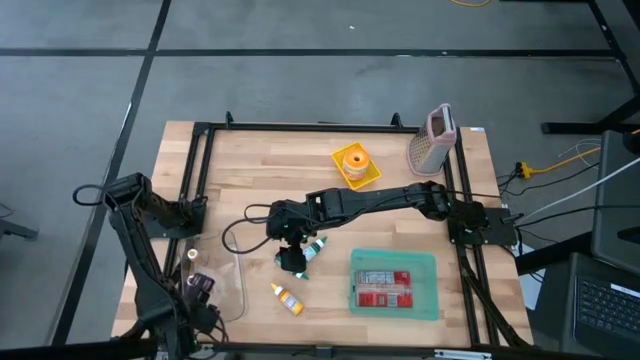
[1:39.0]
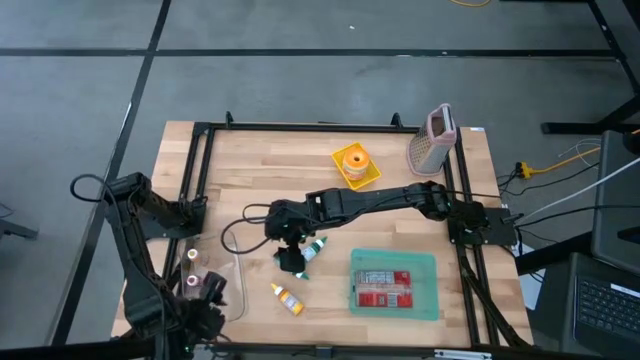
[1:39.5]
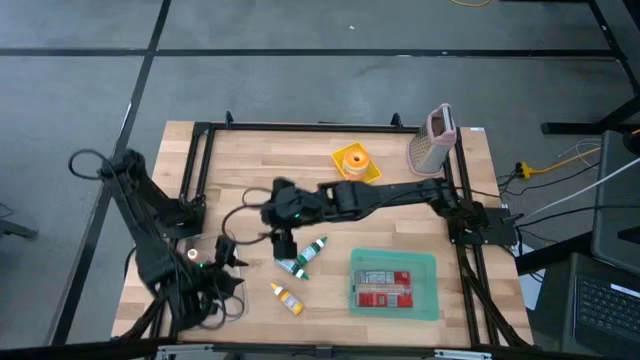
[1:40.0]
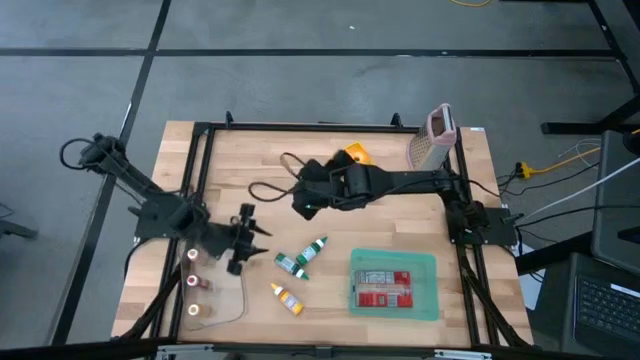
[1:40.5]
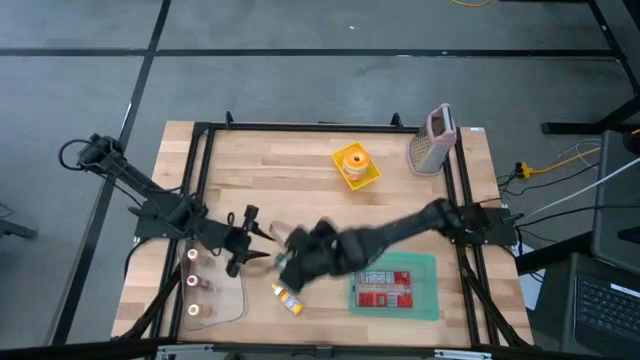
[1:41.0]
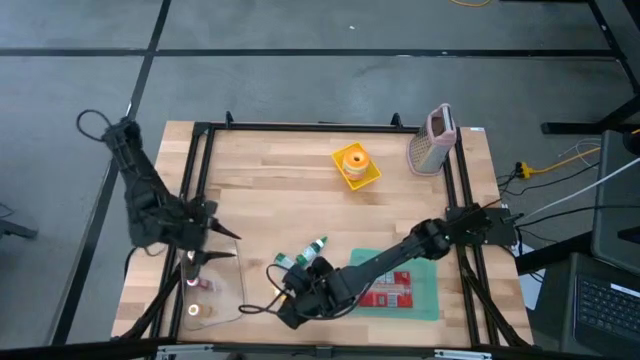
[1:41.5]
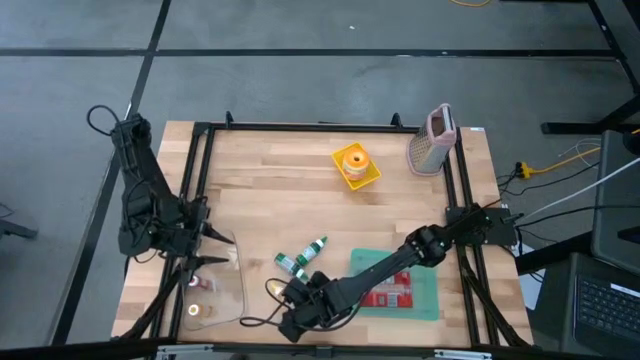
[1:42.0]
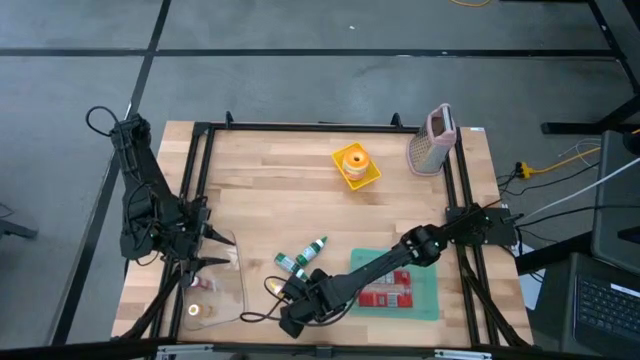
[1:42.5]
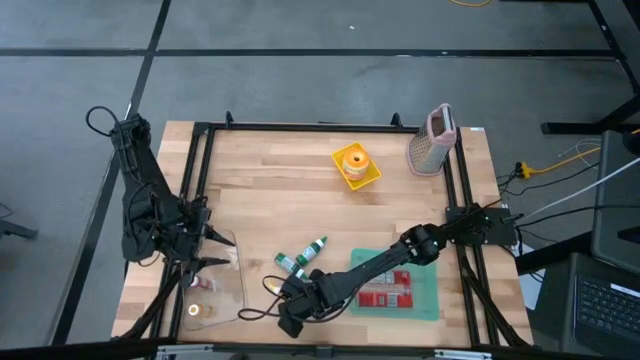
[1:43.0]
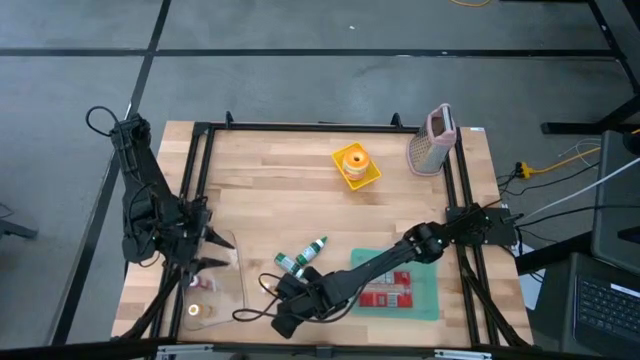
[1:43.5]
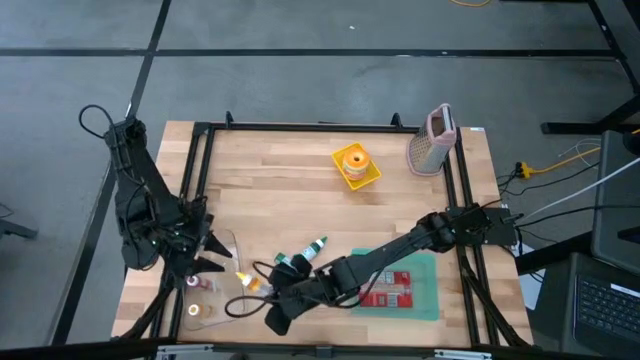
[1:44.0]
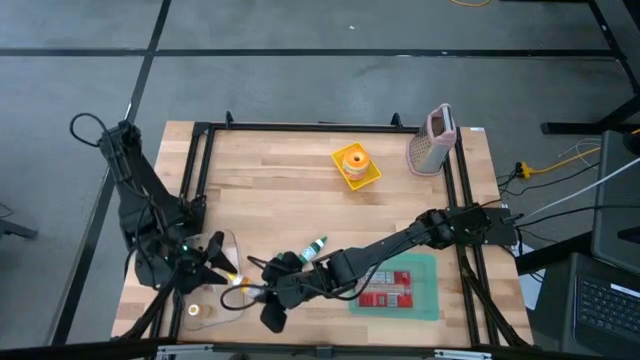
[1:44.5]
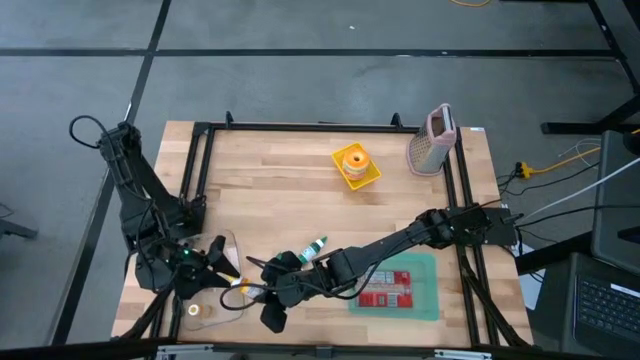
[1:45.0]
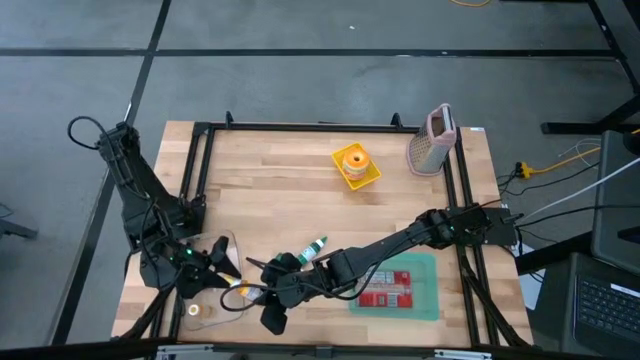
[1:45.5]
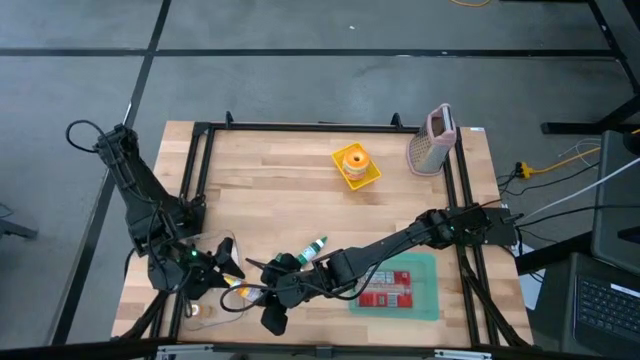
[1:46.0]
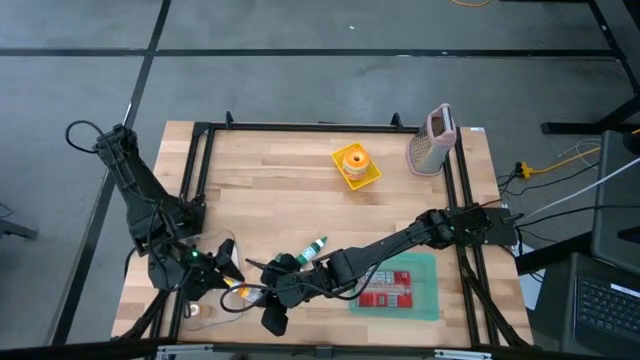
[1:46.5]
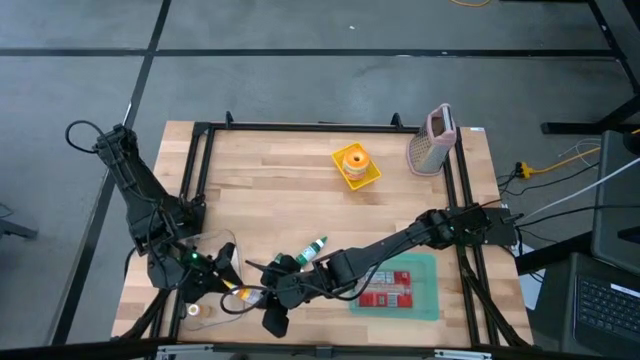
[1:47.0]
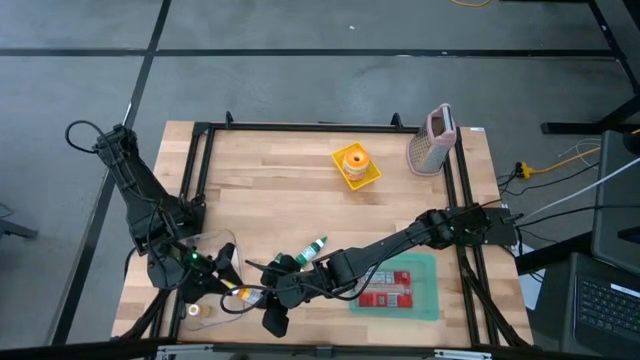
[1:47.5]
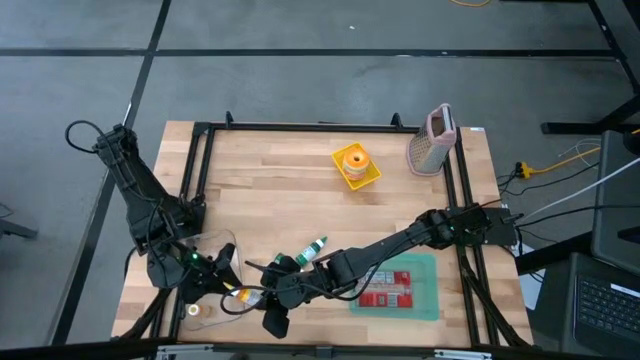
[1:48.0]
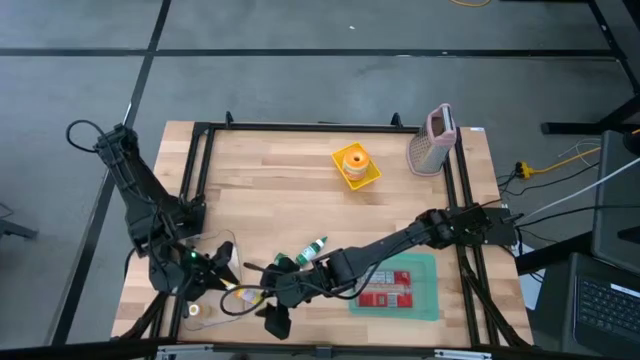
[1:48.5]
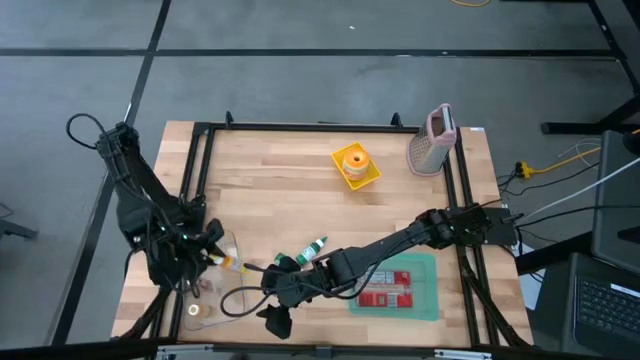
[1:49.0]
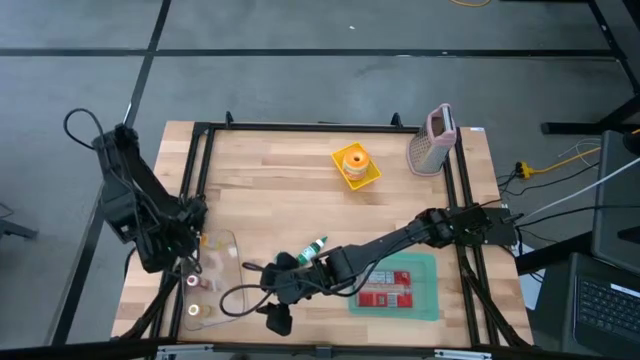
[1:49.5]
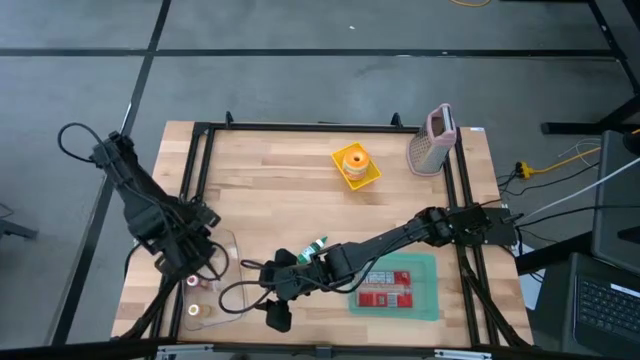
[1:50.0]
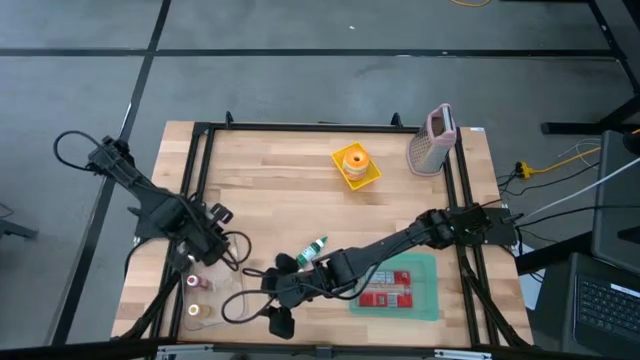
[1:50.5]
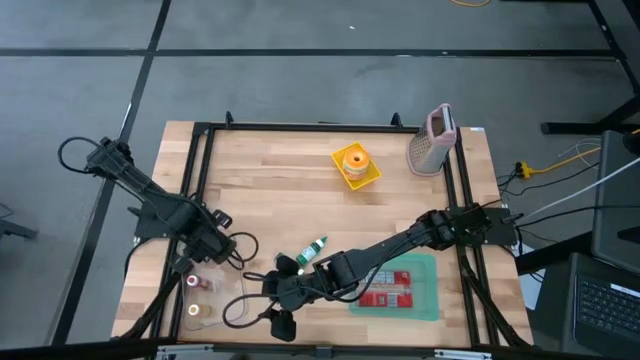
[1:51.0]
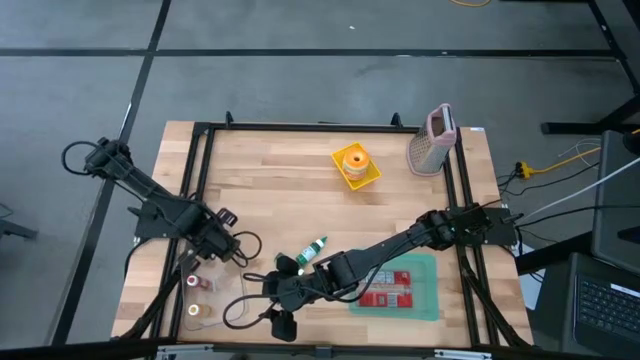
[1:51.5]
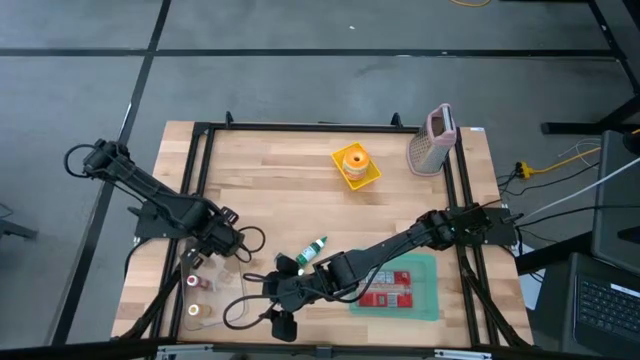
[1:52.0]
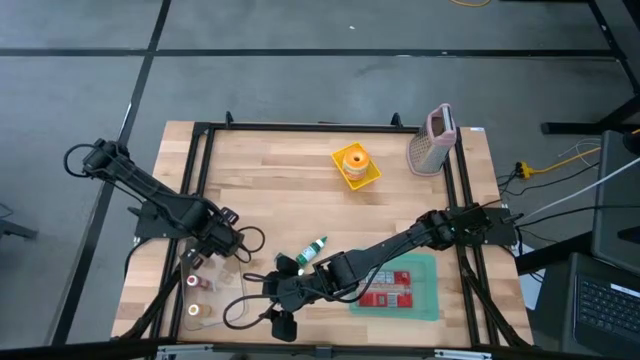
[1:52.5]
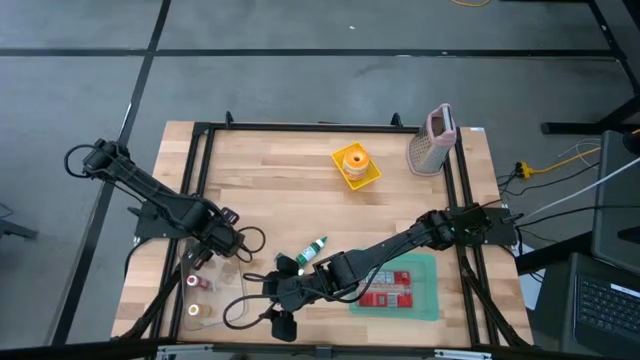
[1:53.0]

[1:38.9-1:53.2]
Put the yellow food coloring bottle into the transparent bin
